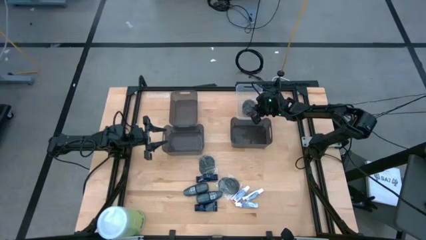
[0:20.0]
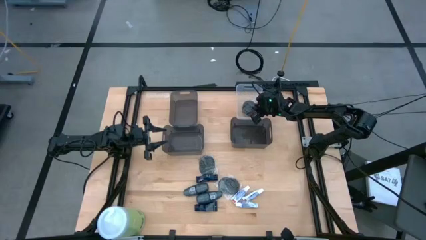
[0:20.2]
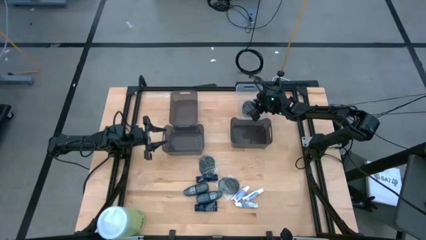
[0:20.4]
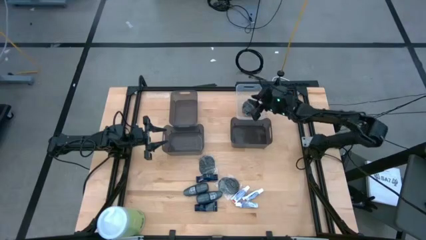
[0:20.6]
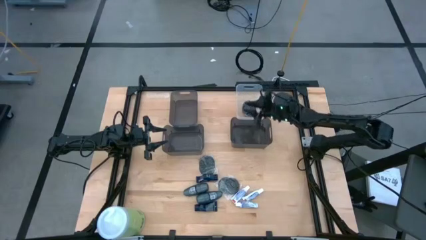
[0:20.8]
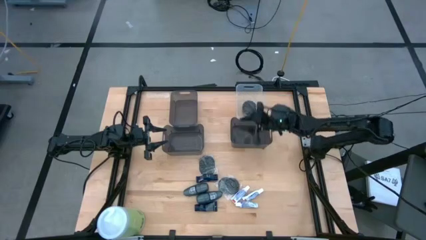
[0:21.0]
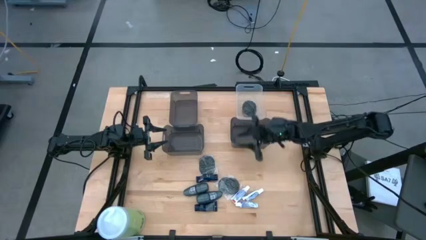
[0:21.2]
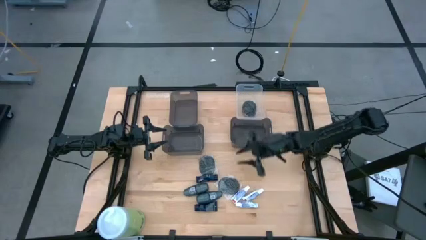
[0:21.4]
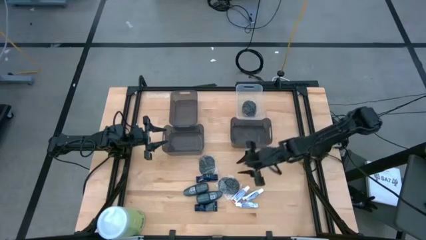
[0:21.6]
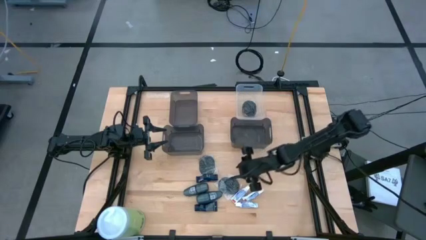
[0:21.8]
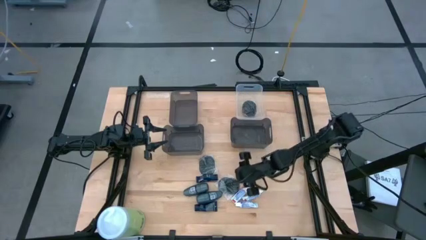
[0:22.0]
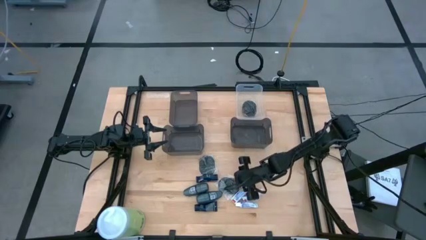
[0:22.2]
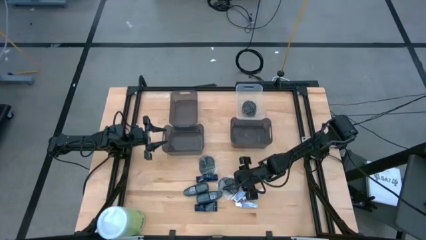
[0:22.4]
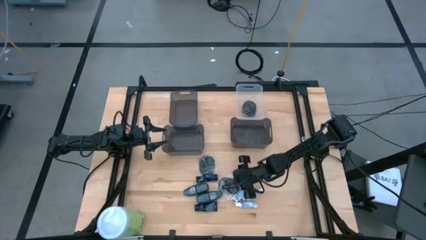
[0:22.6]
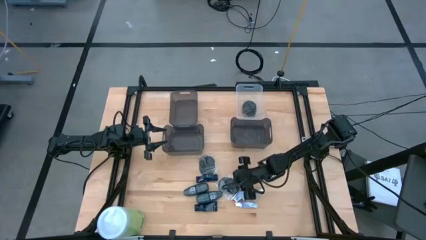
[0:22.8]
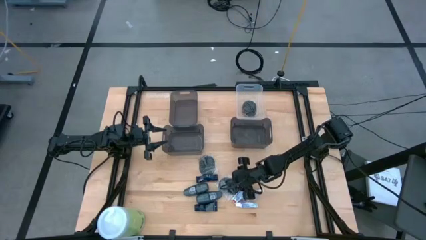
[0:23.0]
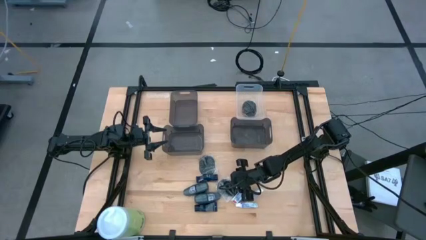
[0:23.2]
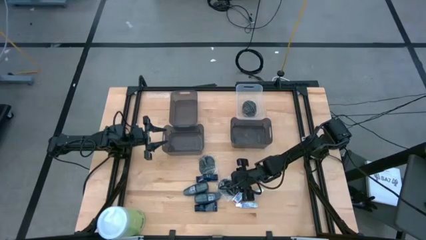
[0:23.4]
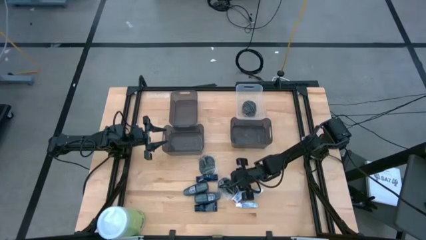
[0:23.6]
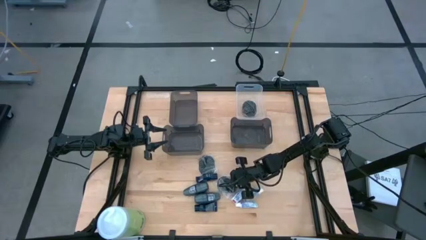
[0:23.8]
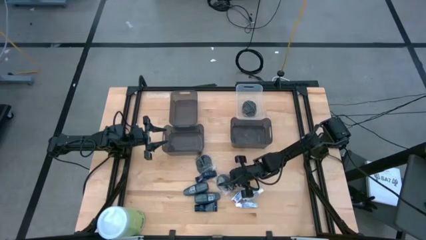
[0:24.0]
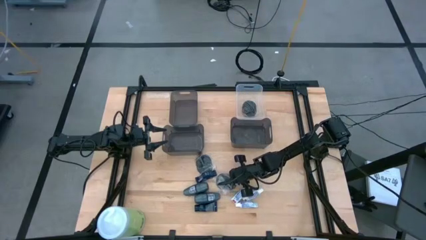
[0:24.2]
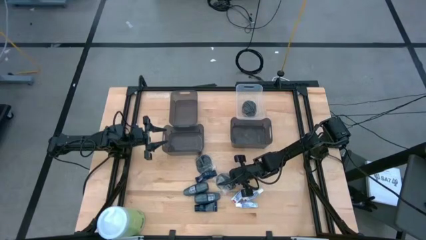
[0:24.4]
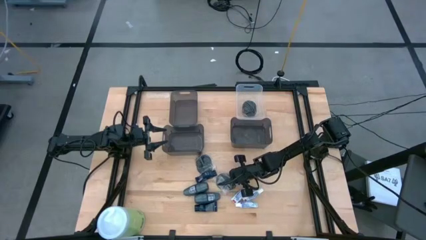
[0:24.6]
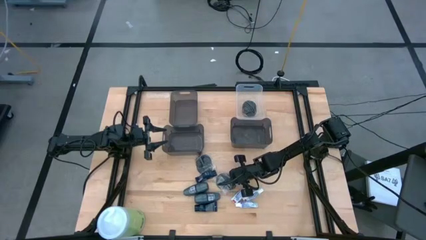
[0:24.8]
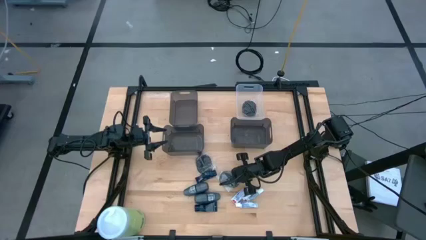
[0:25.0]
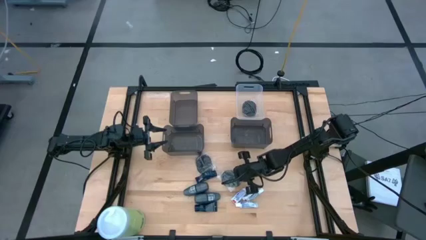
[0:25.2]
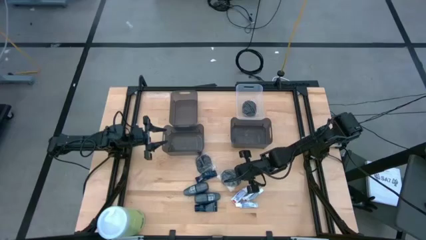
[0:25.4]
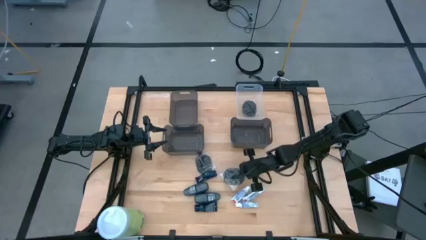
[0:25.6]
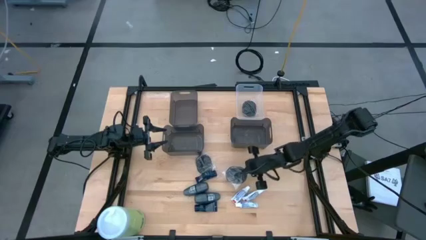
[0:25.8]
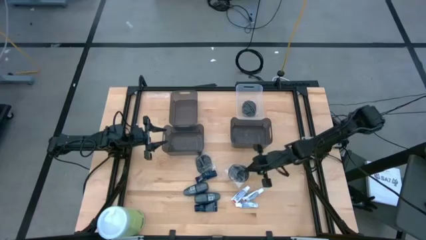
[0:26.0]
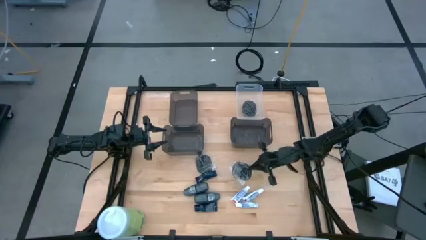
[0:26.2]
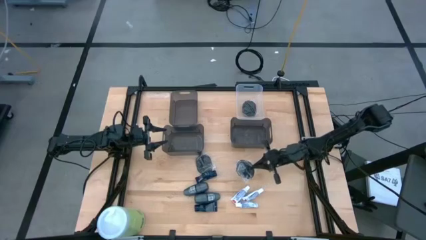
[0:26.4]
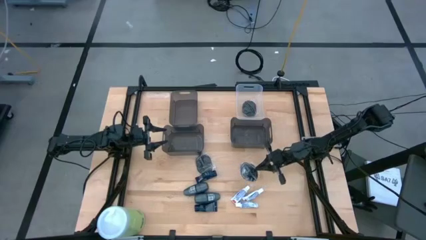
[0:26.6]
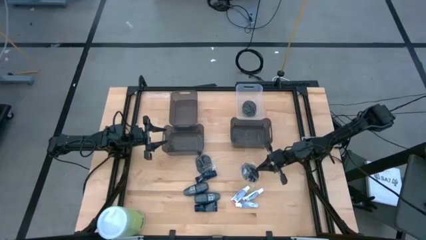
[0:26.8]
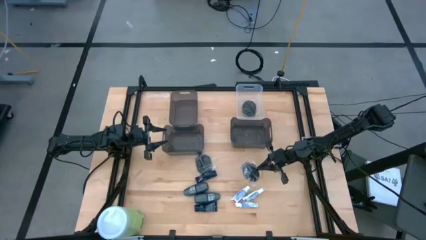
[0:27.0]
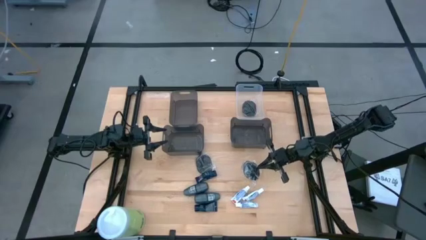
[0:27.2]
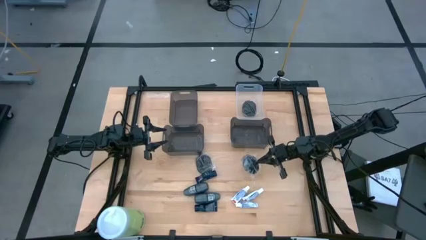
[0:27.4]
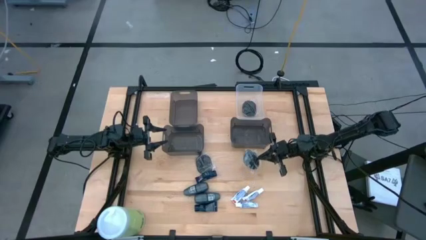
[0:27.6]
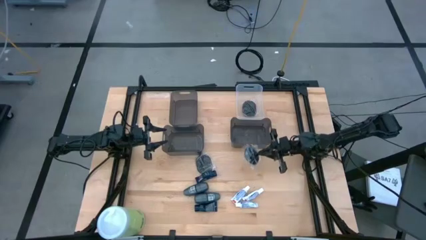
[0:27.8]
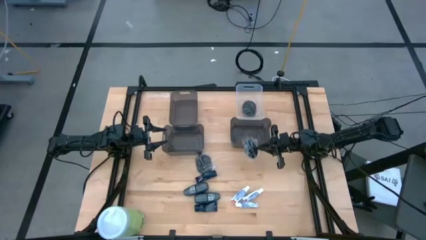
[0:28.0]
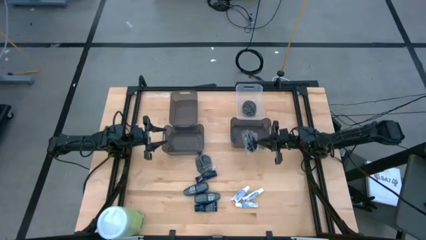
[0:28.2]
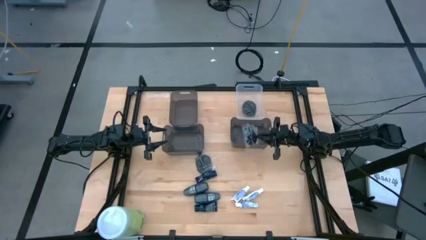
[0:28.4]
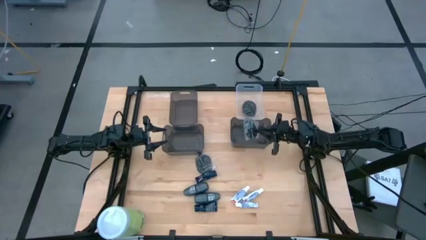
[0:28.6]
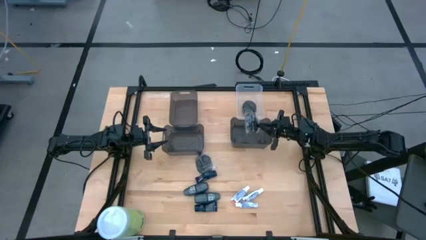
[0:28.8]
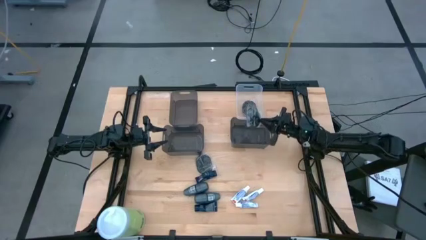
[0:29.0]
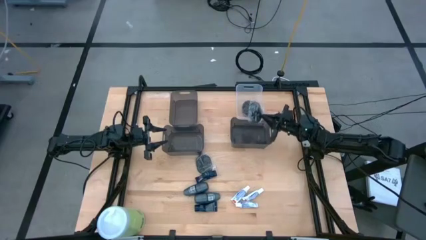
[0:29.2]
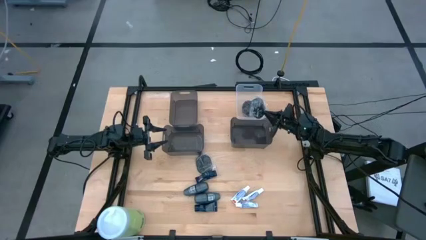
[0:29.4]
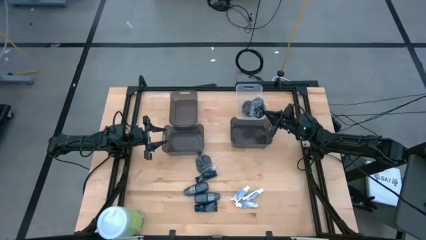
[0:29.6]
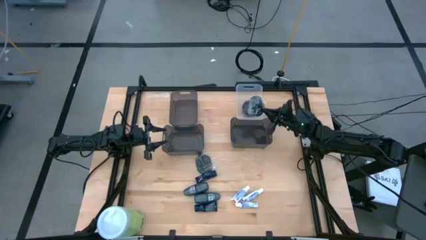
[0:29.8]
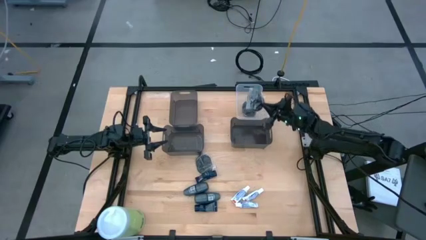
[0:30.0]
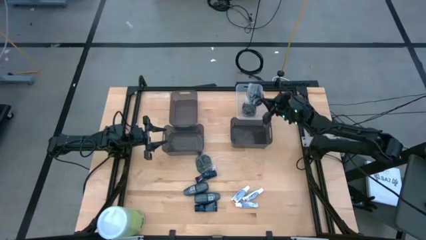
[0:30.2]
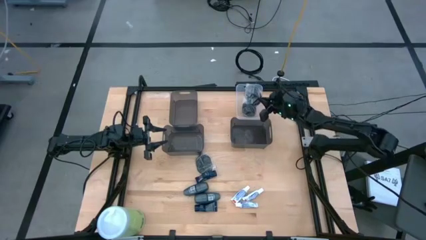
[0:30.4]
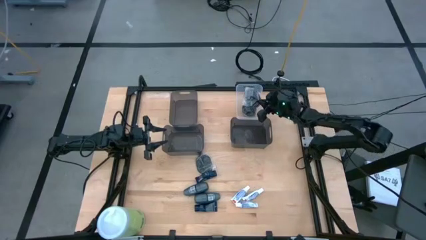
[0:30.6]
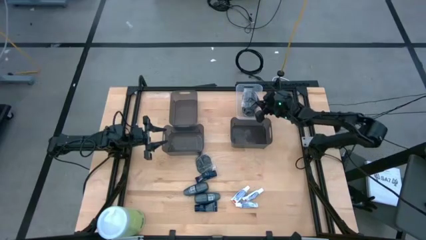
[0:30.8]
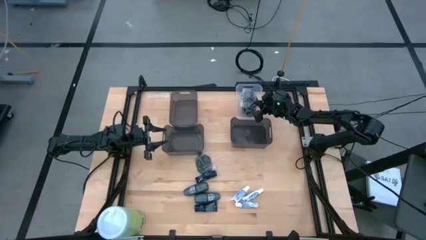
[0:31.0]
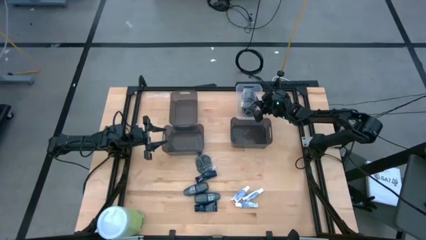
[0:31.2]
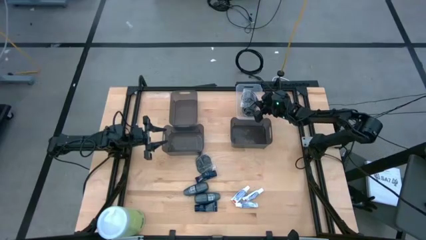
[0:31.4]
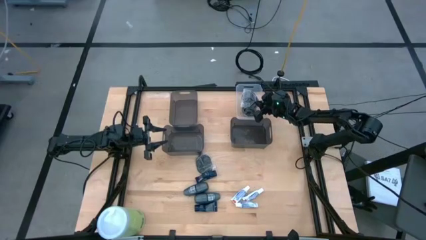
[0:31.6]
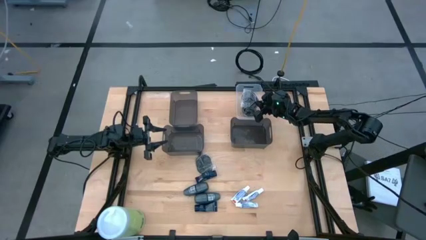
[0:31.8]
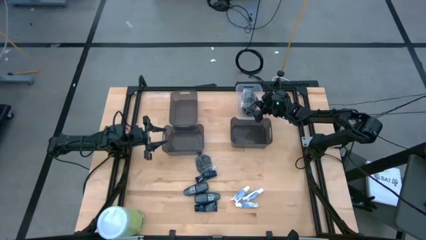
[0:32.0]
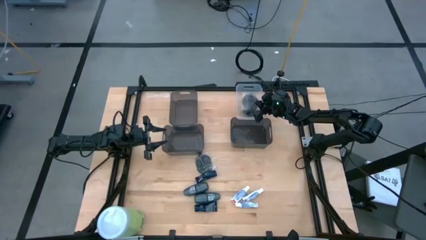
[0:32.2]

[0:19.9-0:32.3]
Task: Pick & Place Travel size toiletries
Put the bottom black hairbrush into the transparent bin
